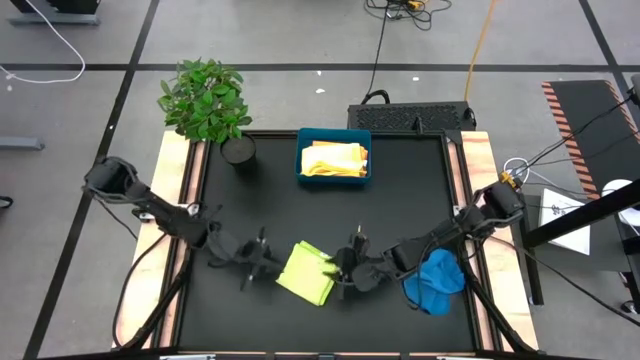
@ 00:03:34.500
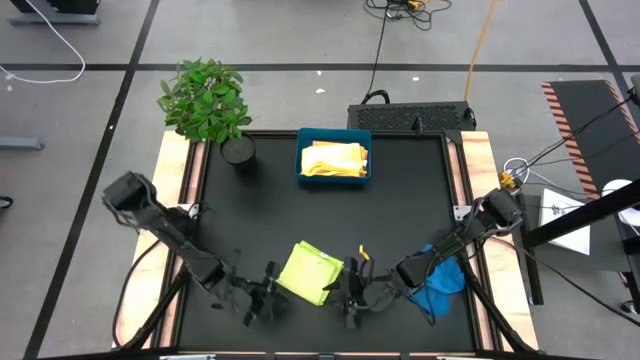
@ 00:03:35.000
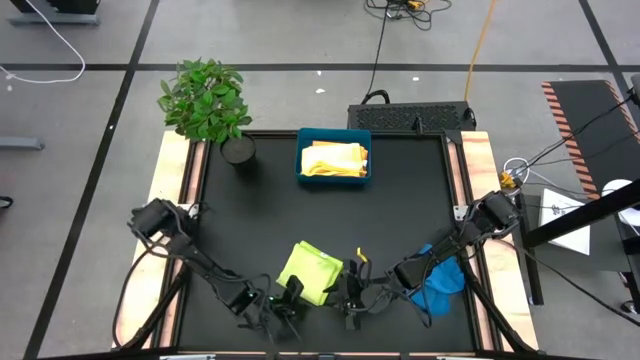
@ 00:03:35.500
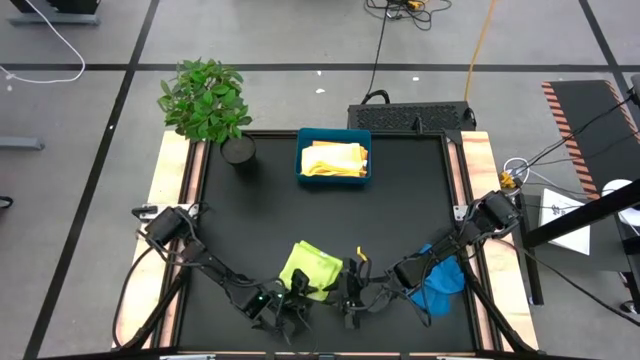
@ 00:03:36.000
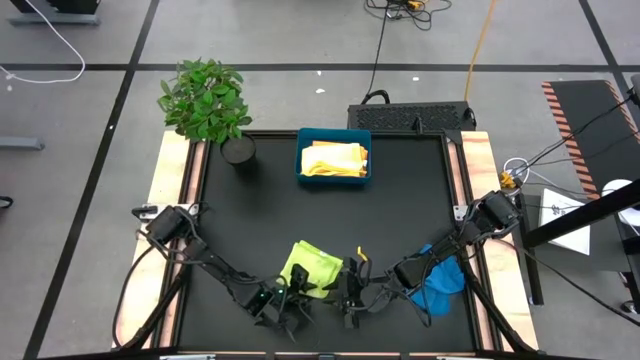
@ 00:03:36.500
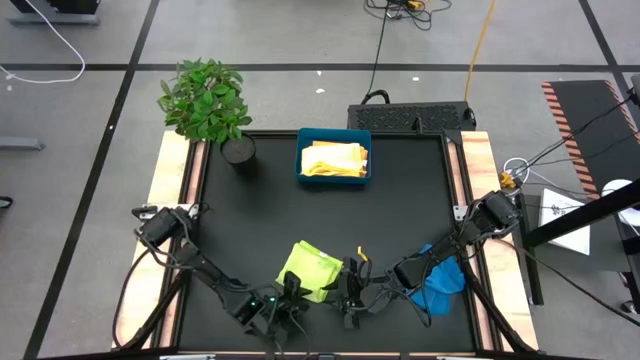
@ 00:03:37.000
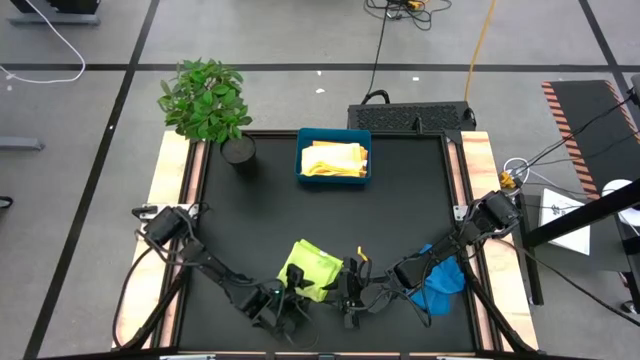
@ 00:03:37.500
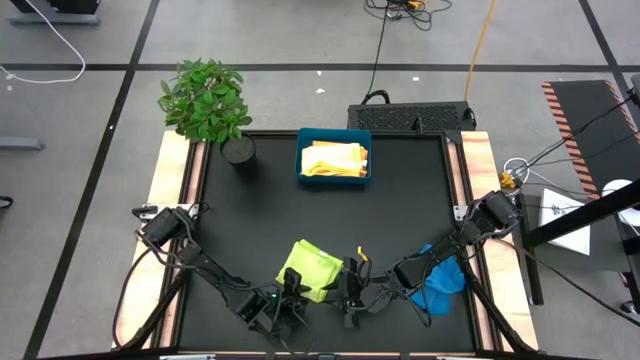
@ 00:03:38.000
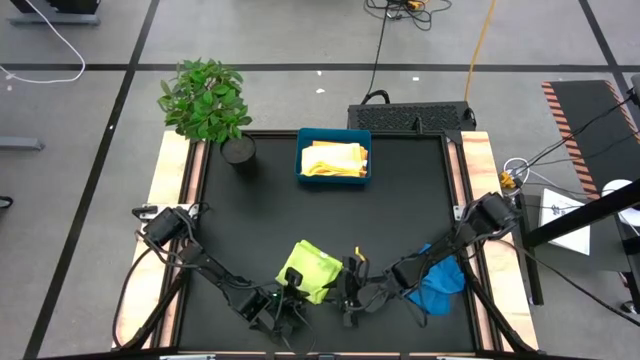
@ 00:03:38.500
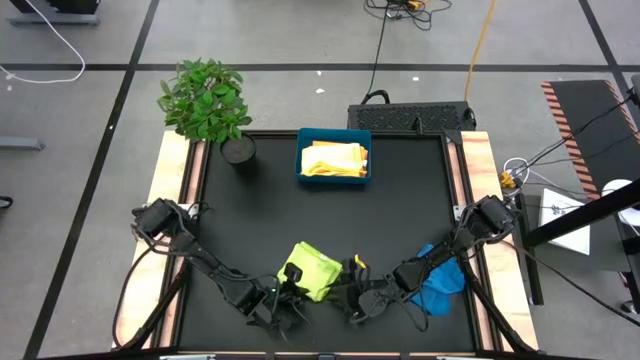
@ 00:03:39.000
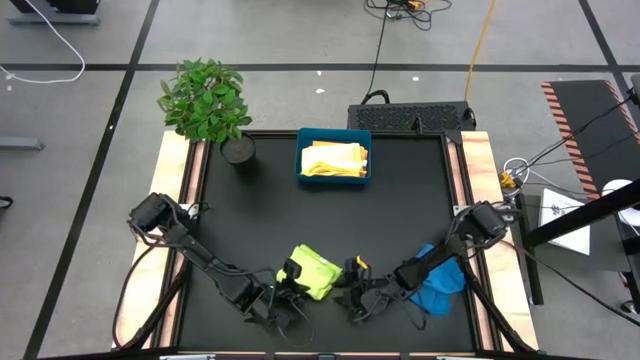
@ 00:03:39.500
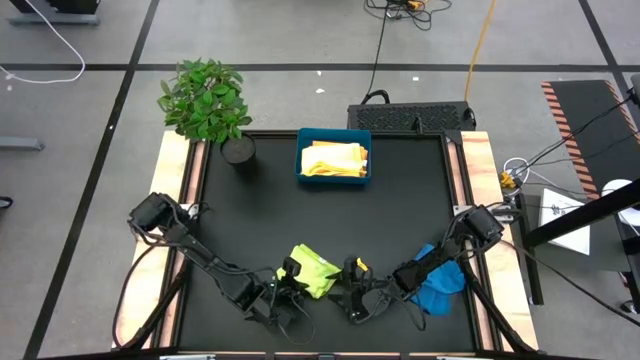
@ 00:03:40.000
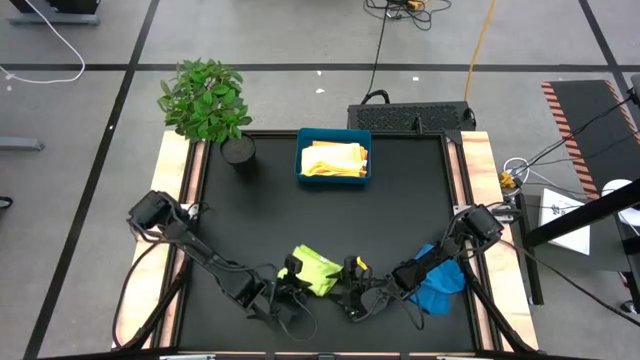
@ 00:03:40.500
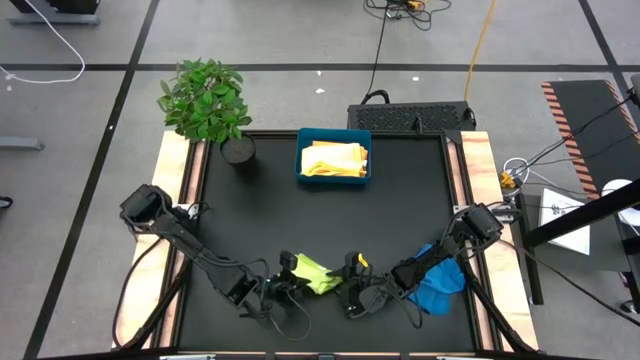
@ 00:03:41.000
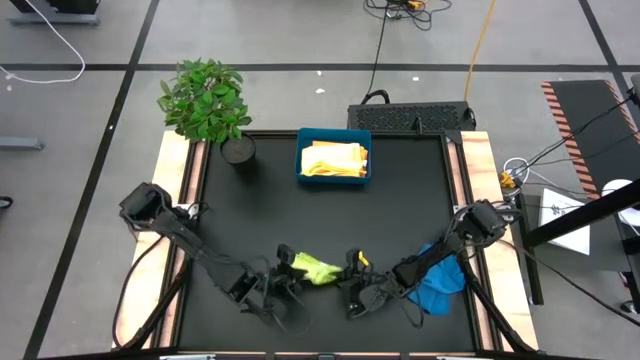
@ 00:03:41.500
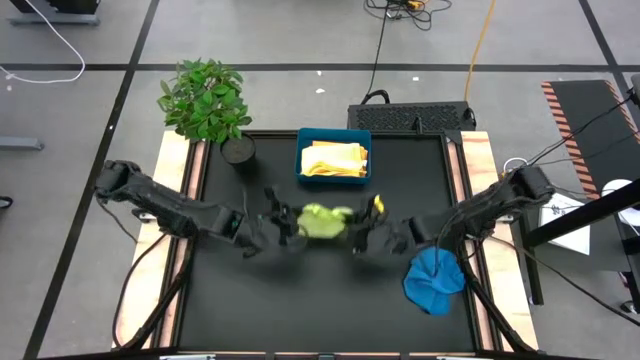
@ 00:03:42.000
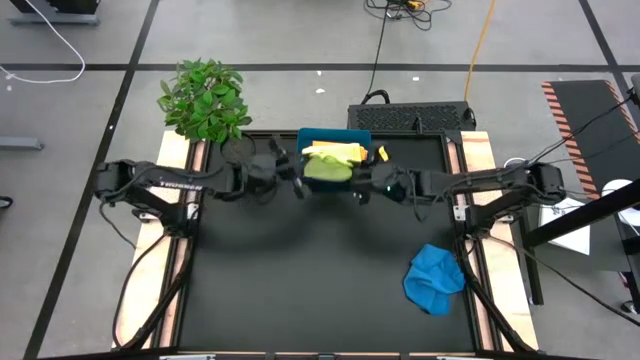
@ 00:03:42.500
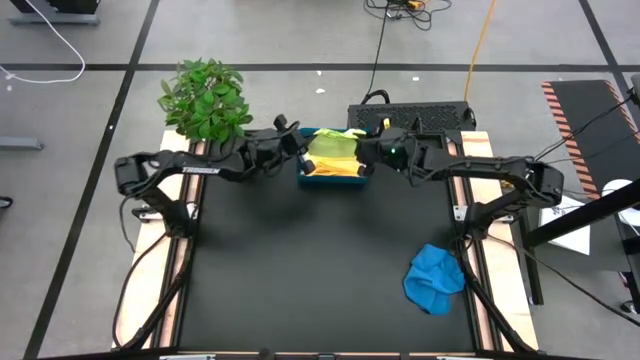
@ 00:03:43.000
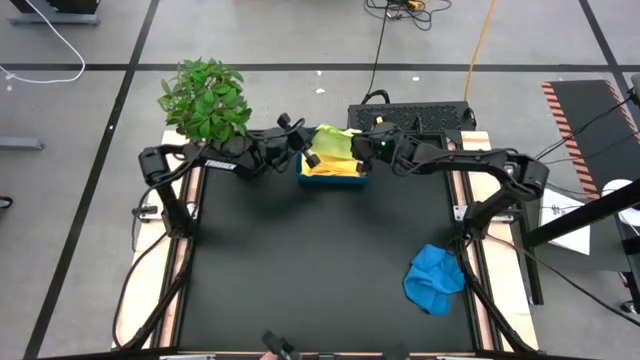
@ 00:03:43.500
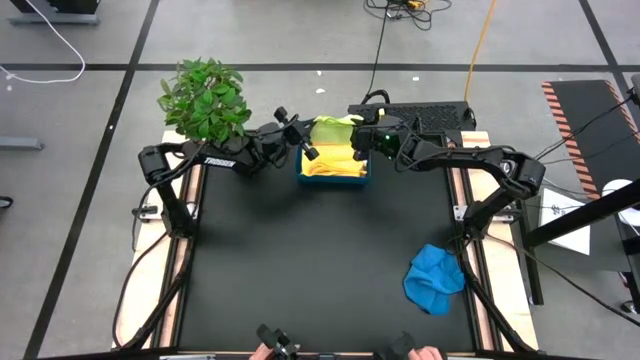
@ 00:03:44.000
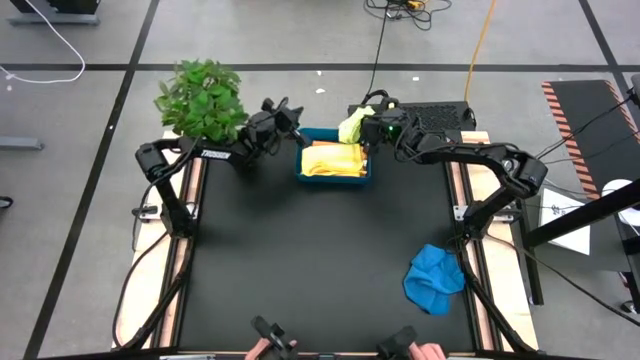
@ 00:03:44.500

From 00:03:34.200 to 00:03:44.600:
Task: Fold microfiber towels
Put the green microfiber towel into the blue blue bin

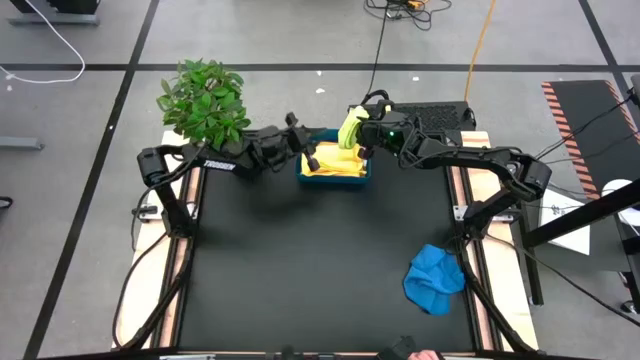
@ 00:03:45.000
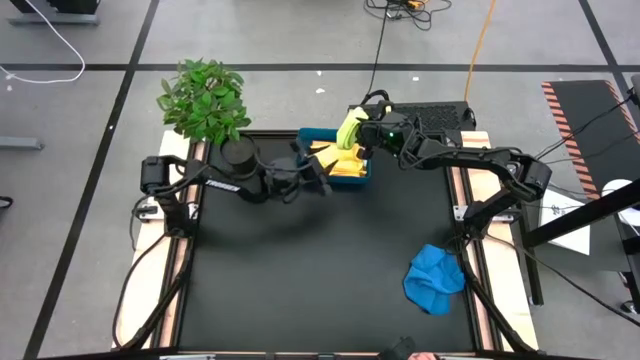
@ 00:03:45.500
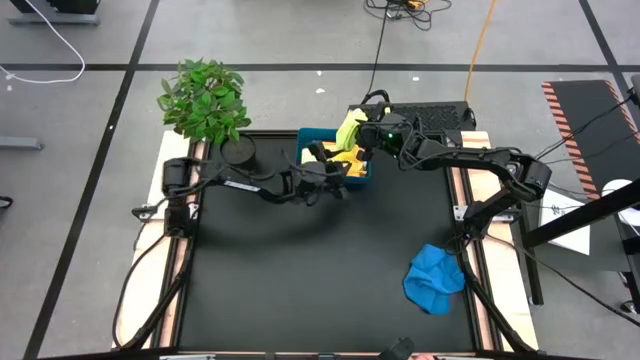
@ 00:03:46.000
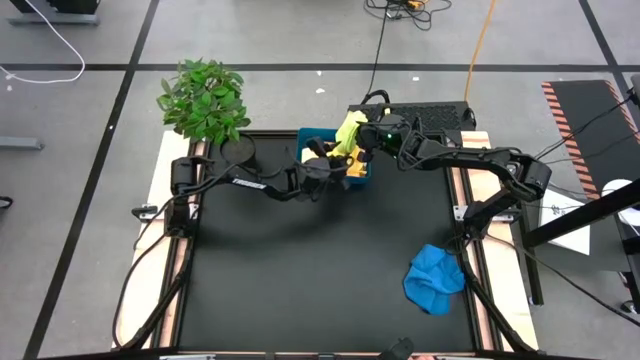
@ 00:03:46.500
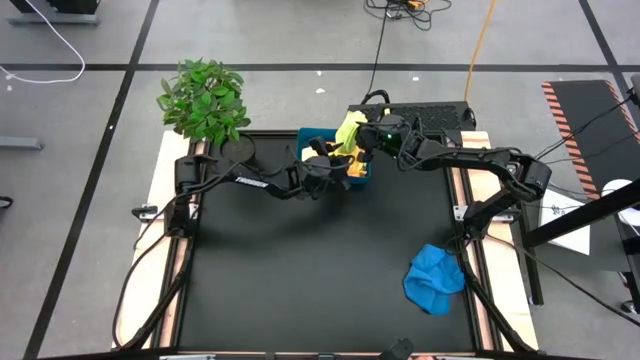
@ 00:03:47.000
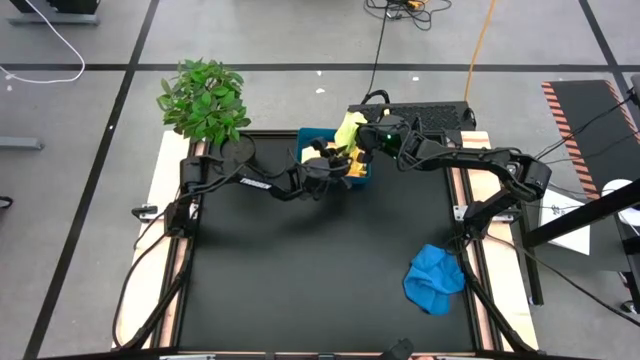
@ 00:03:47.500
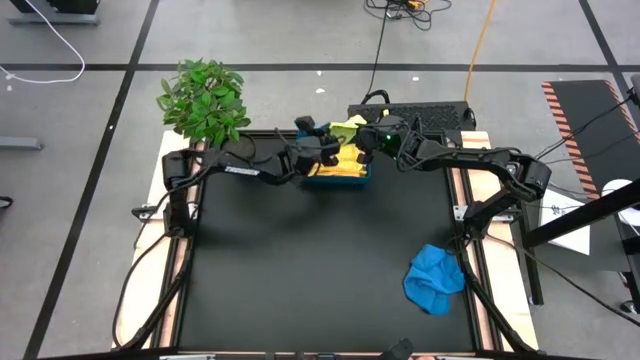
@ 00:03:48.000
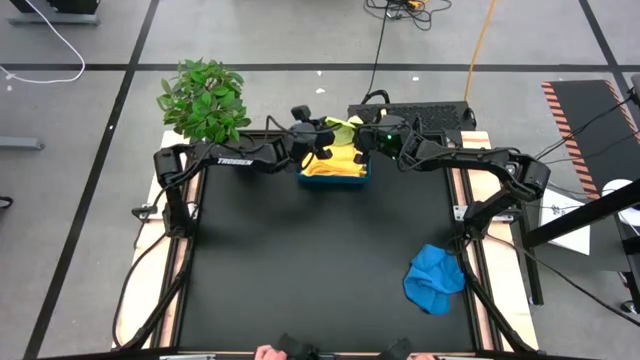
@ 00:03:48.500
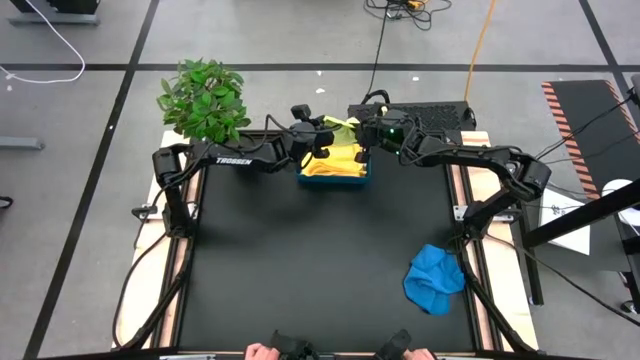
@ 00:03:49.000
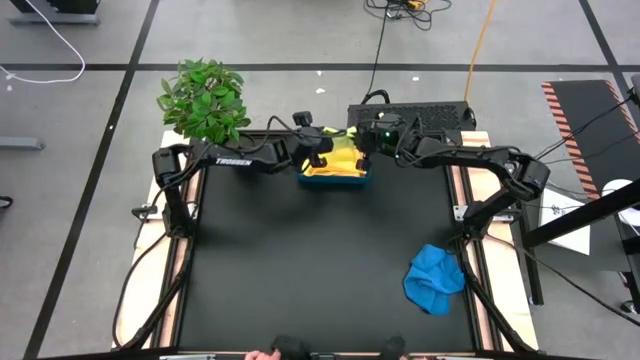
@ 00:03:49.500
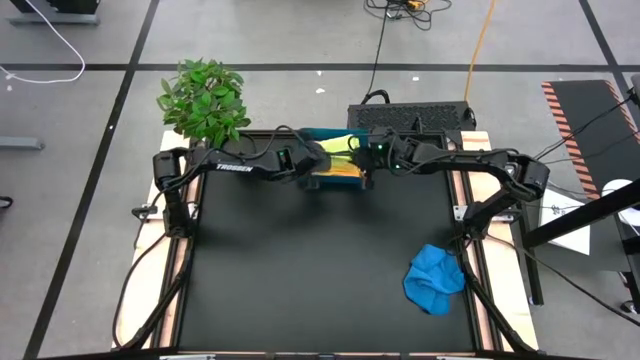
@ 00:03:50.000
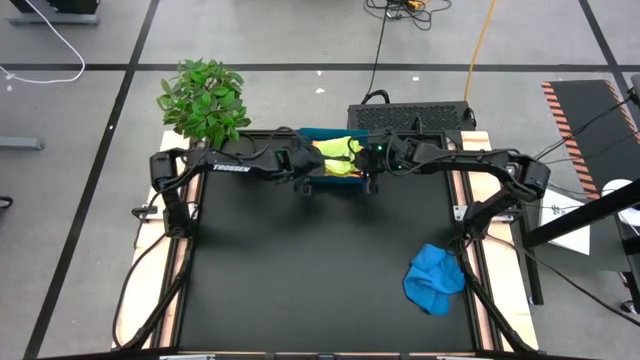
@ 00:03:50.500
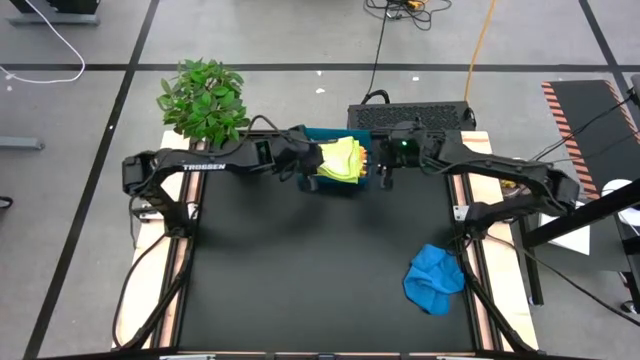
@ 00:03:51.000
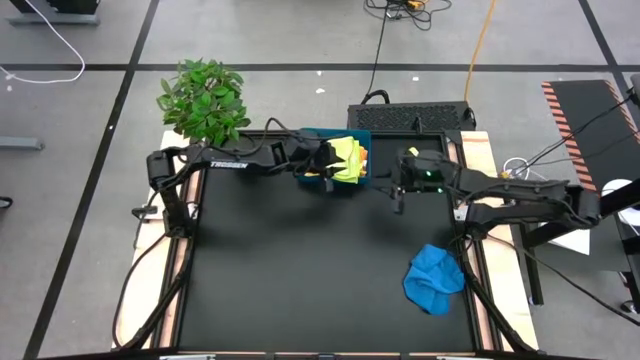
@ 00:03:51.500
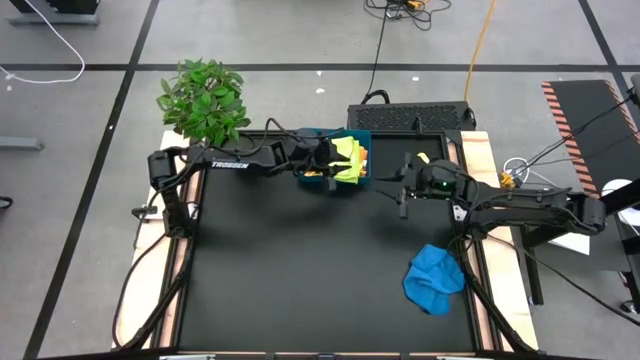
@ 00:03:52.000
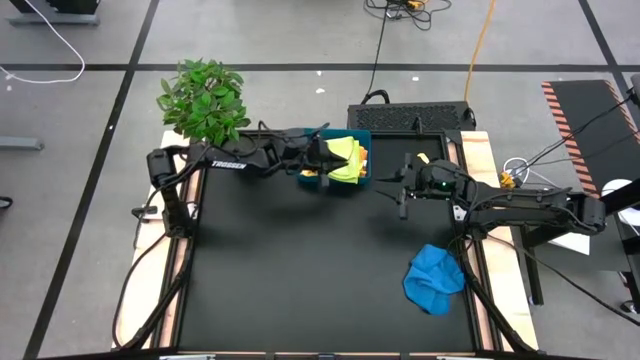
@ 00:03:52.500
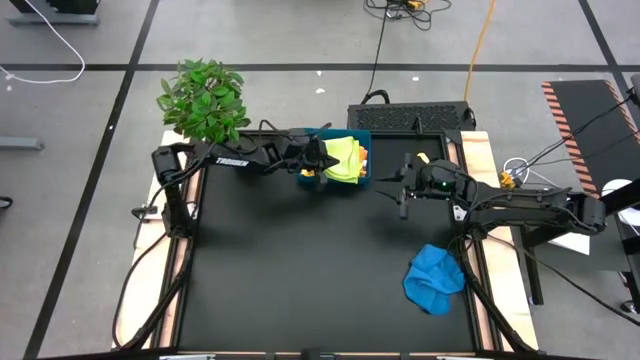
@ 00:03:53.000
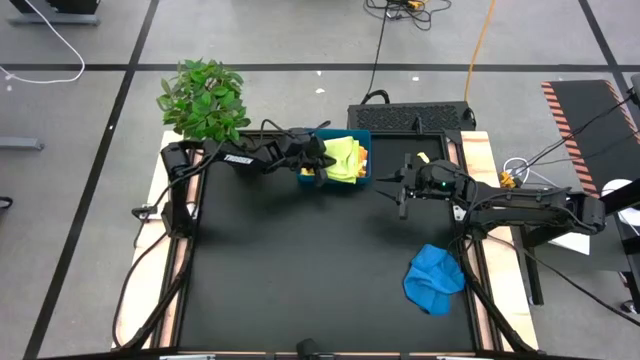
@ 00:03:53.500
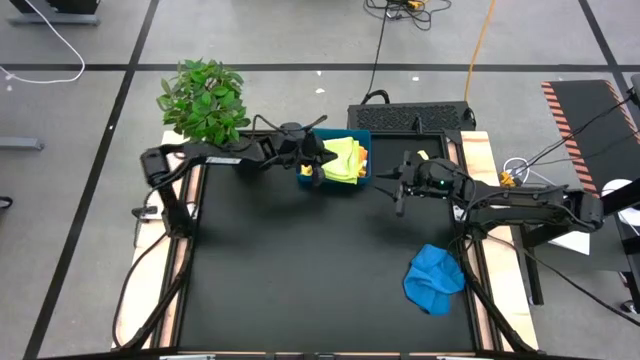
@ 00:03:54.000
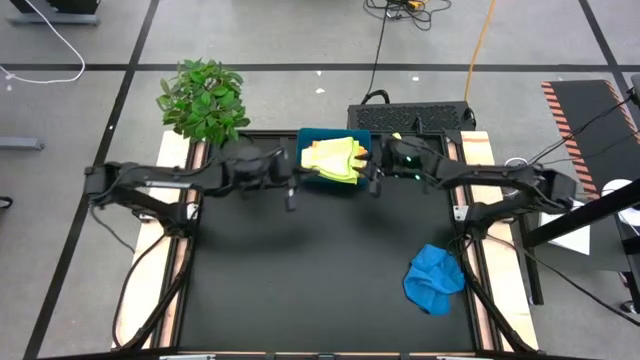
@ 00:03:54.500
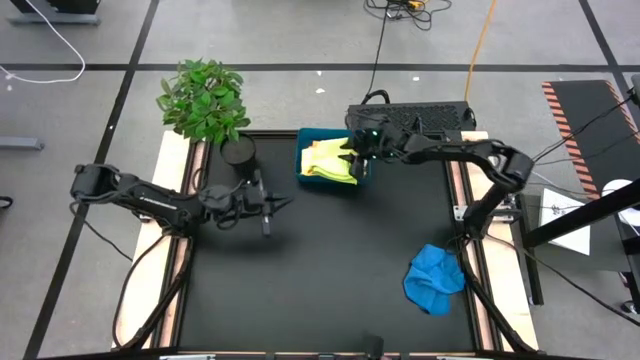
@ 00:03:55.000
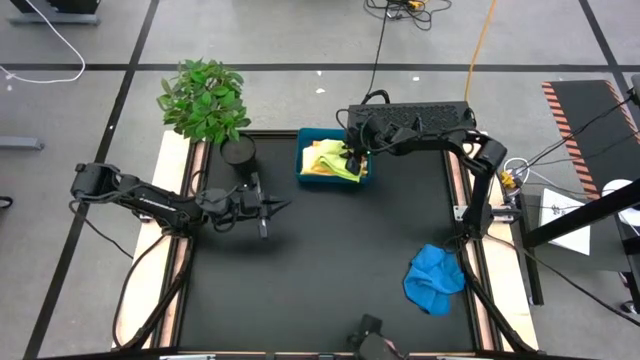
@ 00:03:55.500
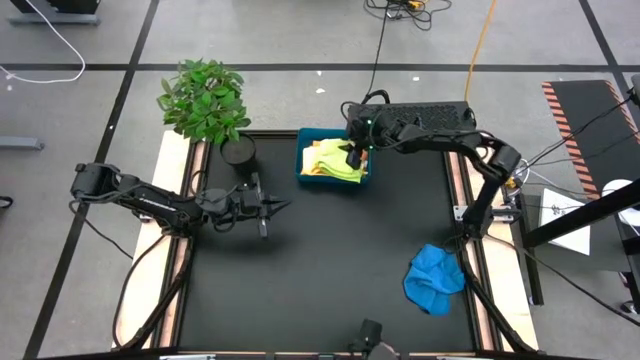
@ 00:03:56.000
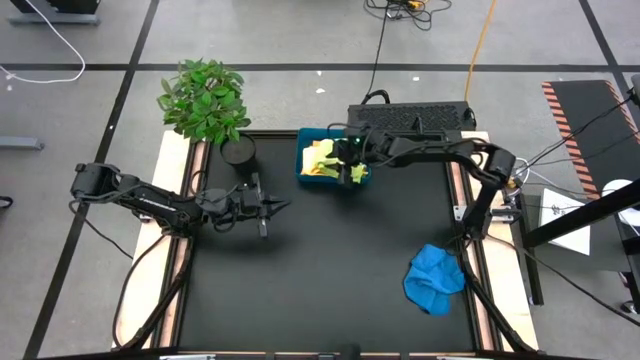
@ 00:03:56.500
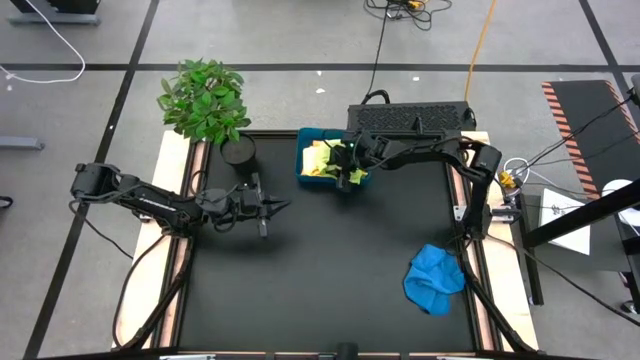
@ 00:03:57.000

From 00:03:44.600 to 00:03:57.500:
Put the green microfiber towel into the blue blue bin
